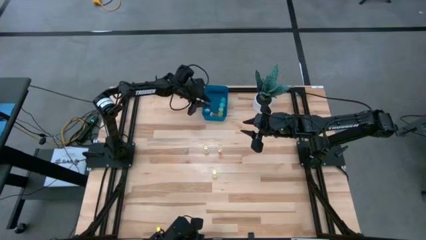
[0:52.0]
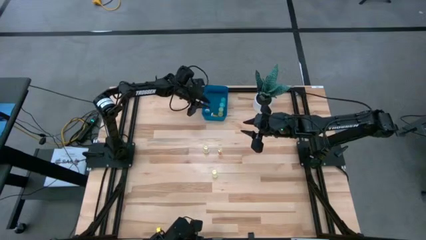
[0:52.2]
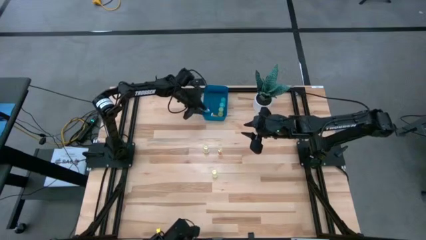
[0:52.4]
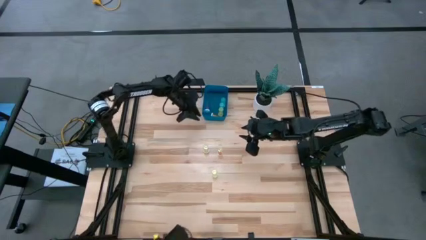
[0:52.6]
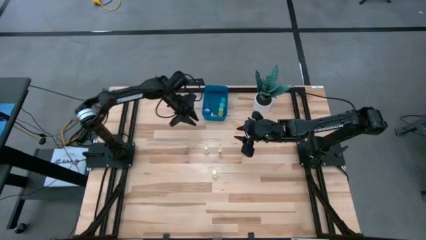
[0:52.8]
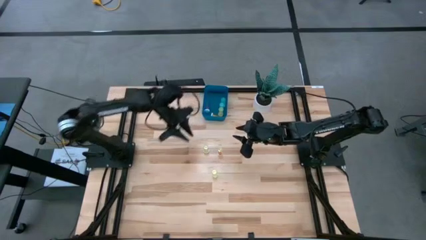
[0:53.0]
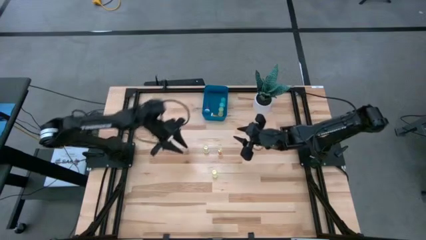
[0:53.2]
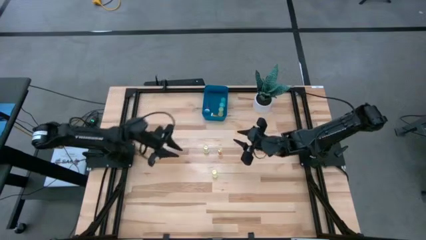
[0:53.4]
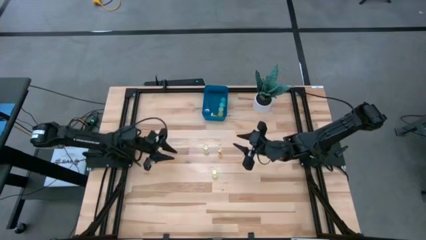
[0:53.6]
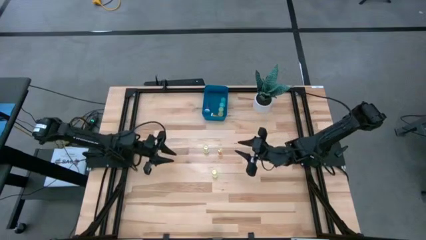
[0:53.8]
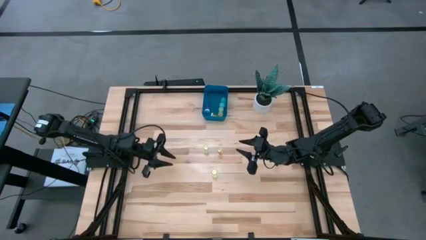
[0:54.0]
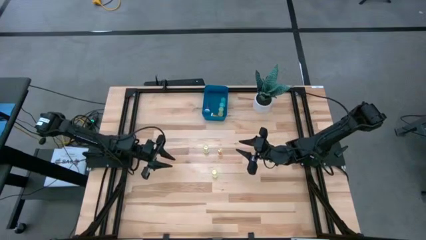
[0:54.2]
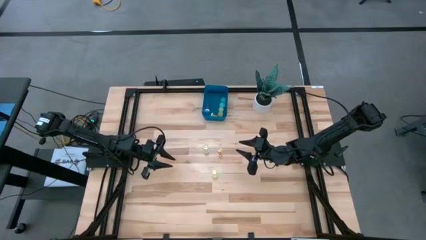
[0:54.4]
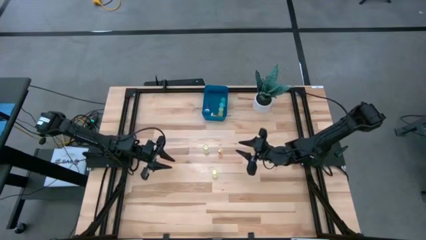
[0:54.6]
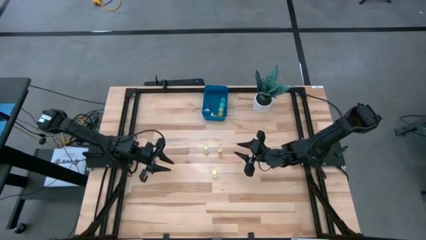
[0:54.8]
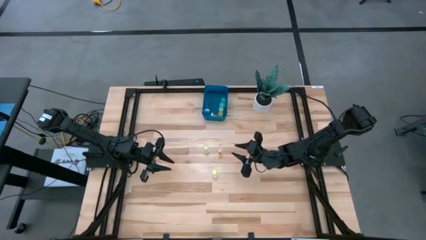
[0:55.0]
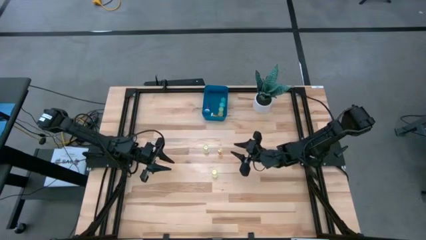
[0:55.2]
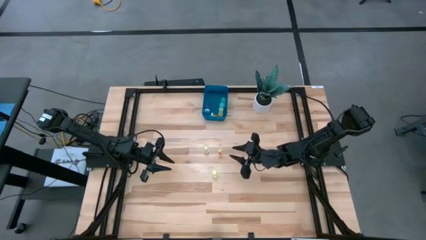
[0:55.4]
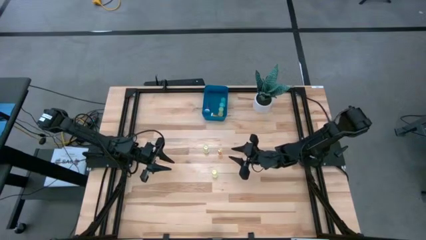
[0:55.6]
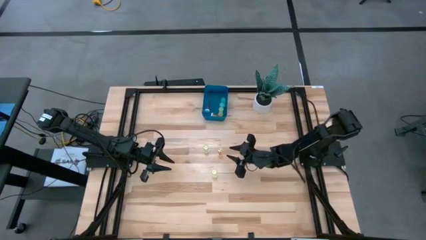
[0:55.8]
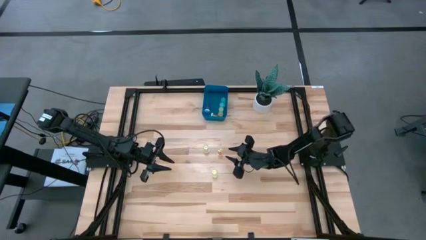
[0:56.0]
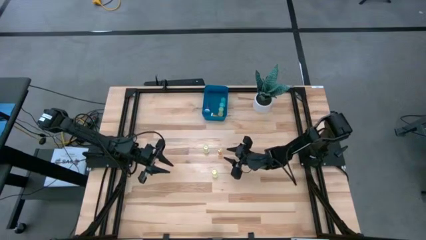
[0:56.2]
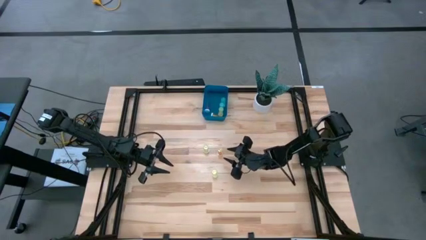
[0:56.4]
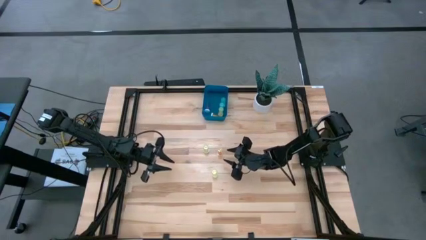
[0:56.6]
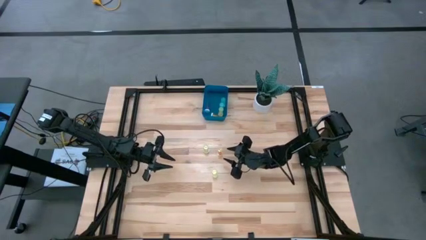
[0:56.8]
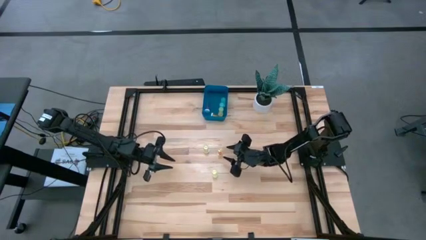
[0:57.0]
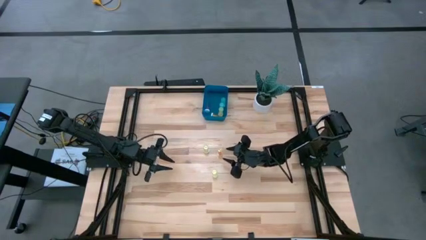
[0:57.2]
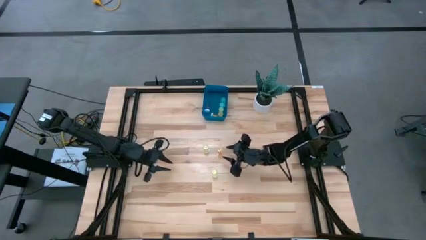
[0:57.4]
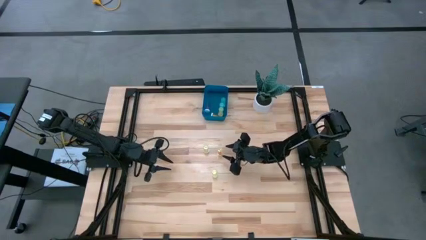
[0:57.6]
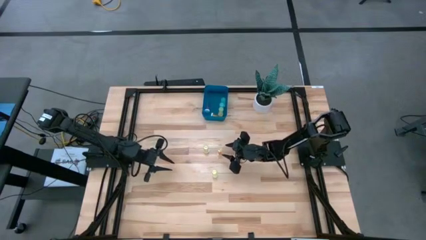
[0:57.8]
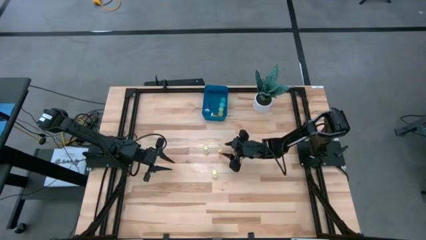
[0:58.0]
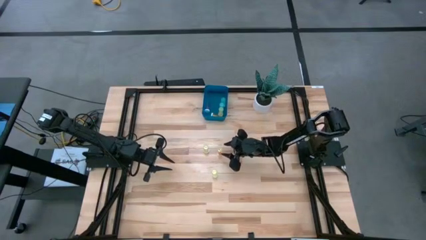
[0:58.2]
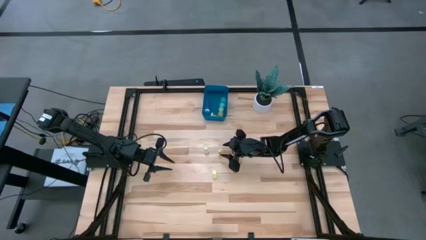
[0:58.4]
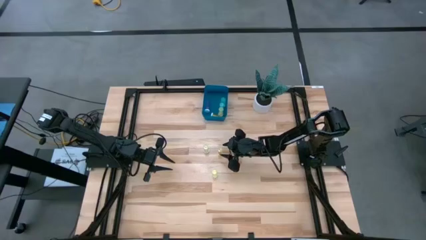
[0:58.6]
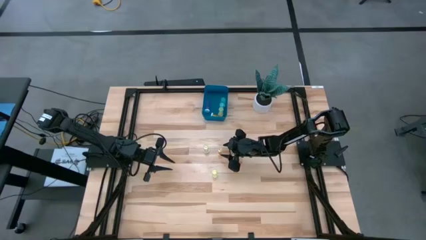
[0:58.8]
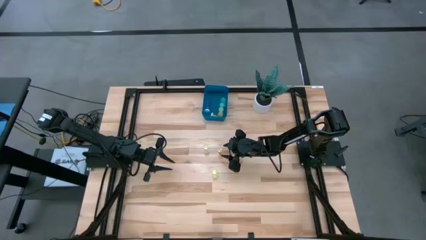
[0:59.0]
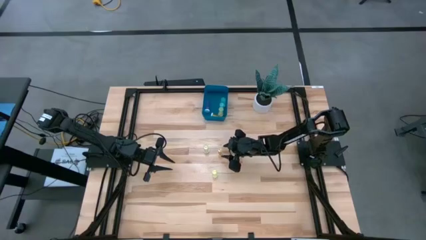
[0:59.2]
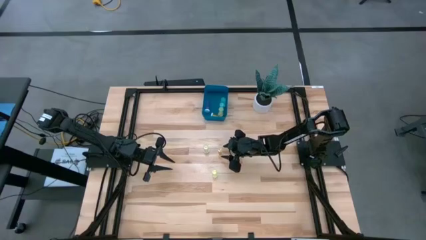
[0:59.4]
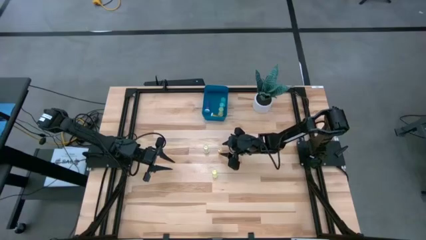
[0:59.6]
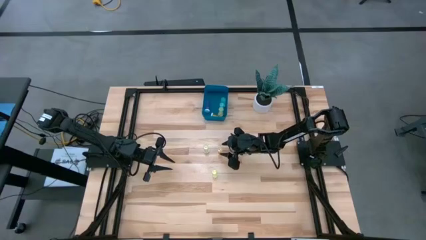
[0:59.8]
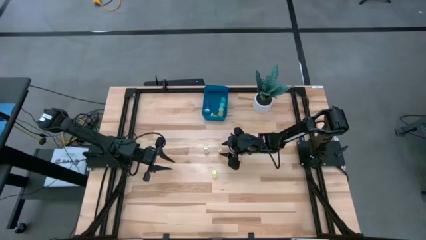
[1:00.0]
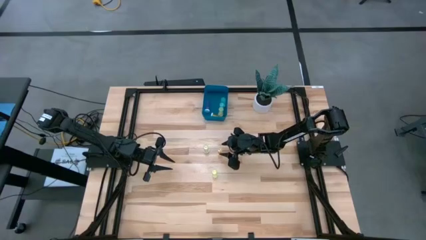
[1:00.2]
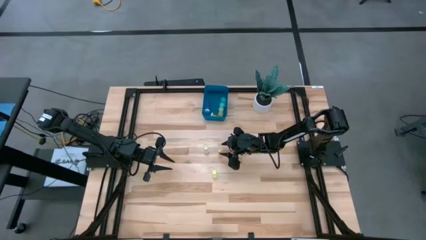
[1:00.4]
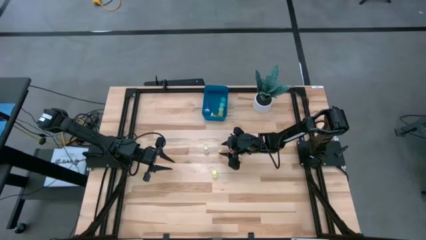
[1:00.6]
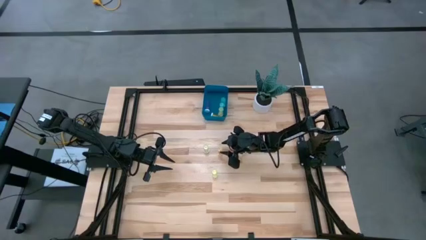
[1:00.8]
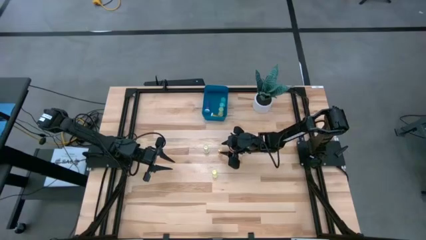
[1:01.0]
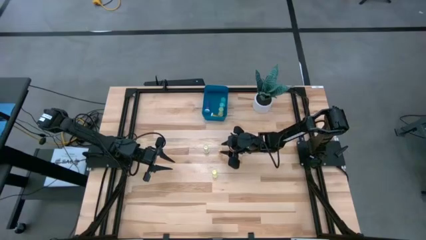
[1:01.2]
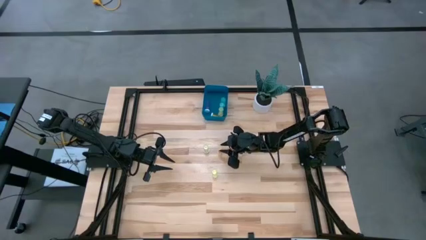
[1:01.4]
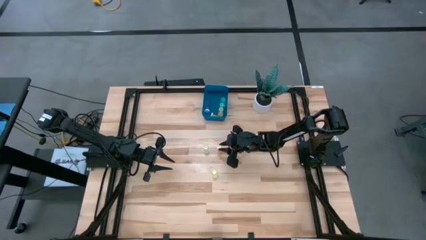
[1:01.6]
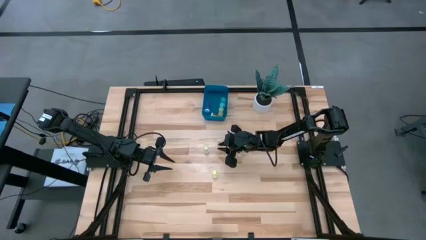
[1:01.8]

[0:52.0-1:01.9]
Task: Pick and place pill bottles into a basket
Put the middle yellow pill bottle into the blue container
